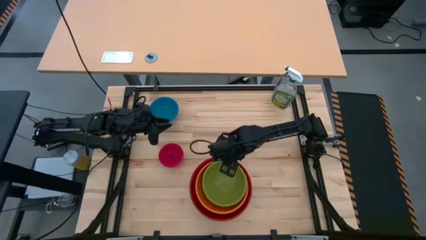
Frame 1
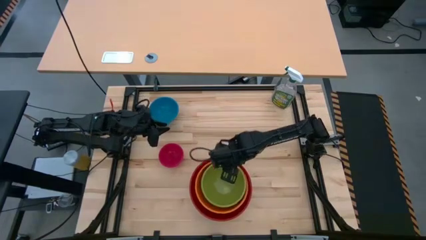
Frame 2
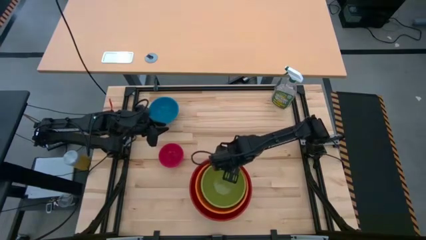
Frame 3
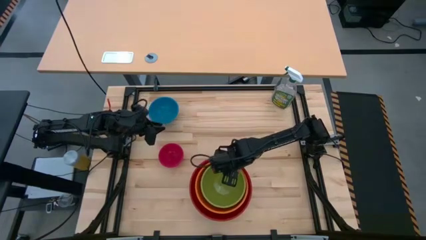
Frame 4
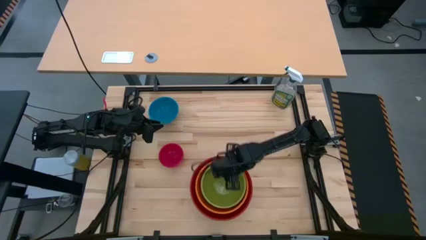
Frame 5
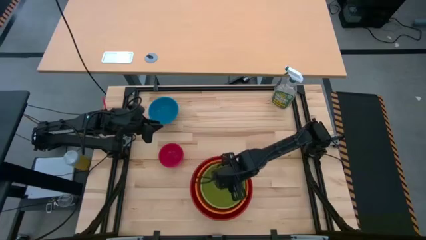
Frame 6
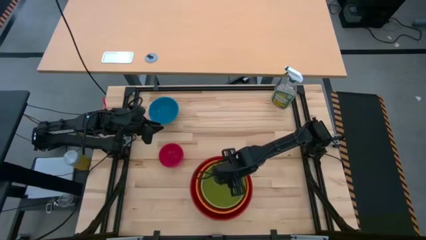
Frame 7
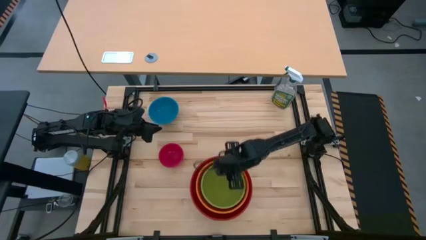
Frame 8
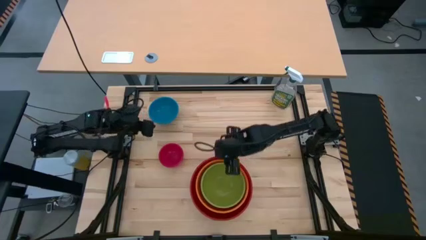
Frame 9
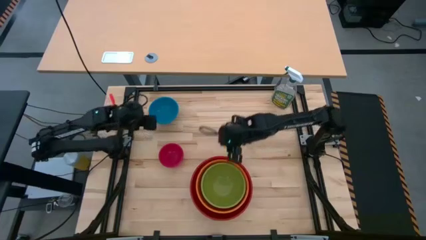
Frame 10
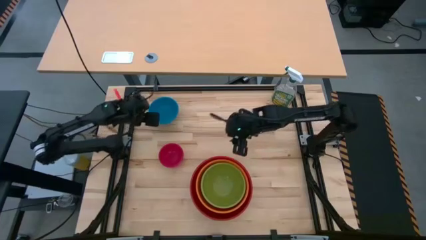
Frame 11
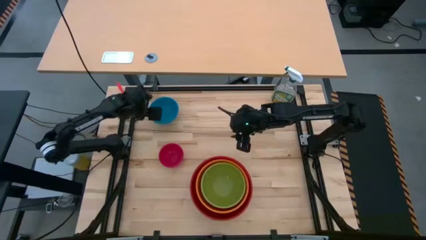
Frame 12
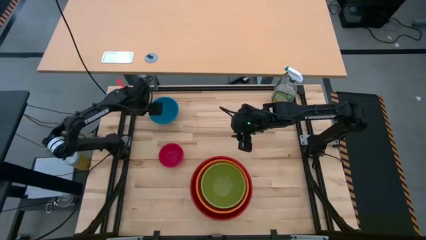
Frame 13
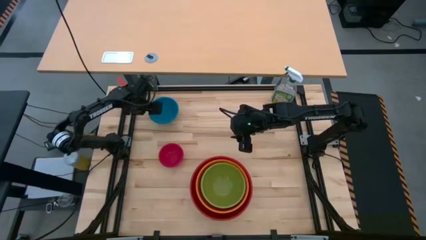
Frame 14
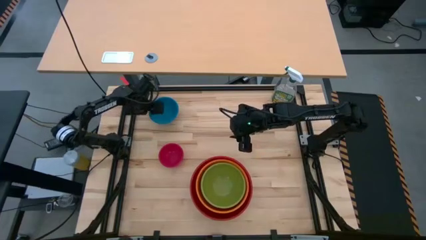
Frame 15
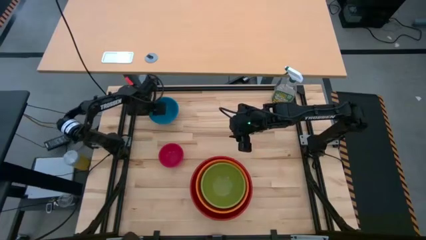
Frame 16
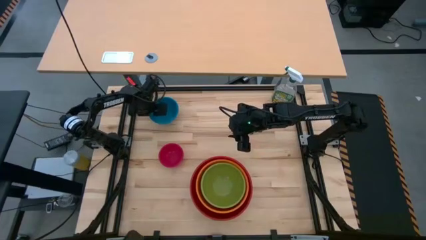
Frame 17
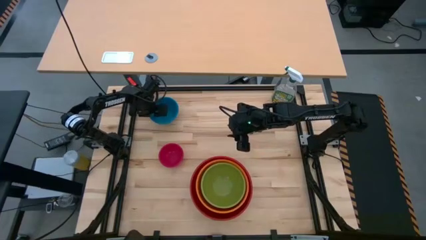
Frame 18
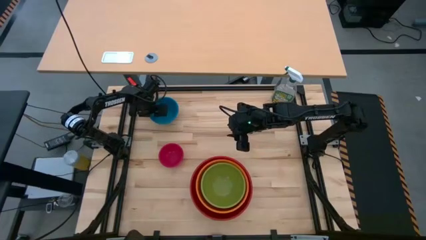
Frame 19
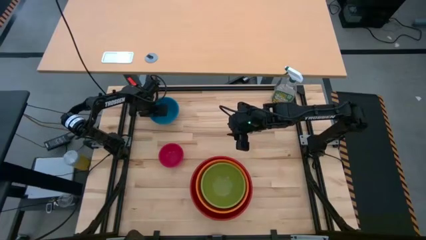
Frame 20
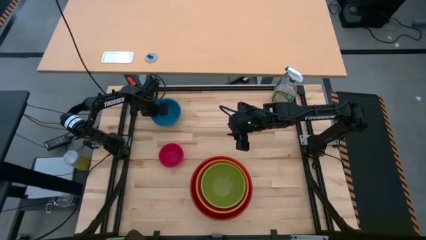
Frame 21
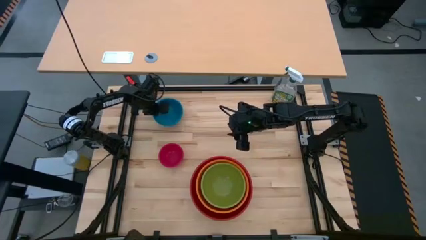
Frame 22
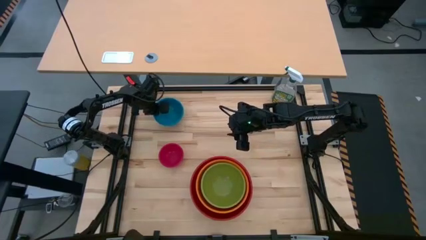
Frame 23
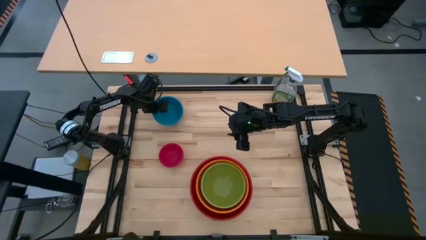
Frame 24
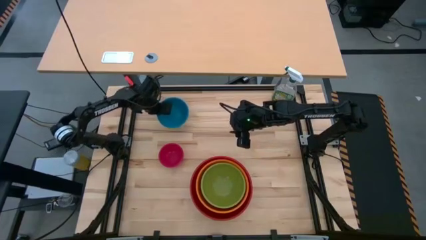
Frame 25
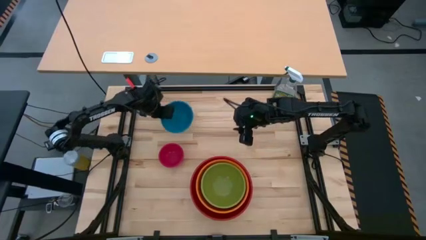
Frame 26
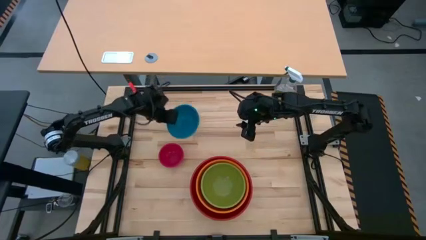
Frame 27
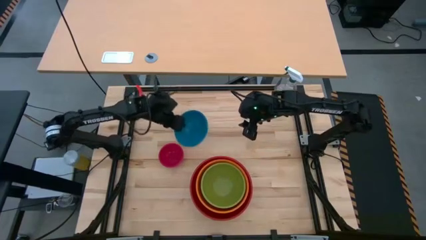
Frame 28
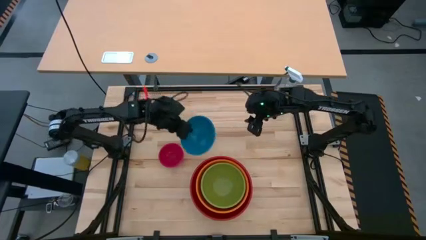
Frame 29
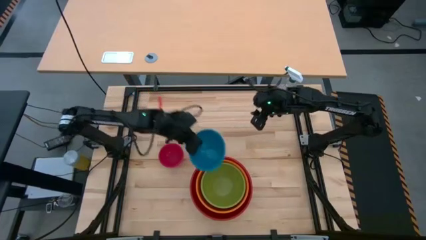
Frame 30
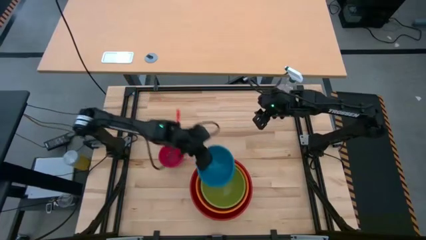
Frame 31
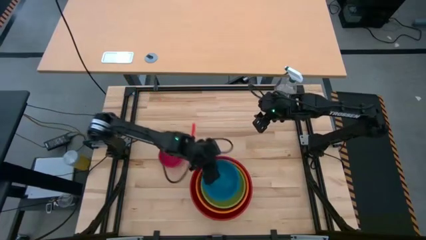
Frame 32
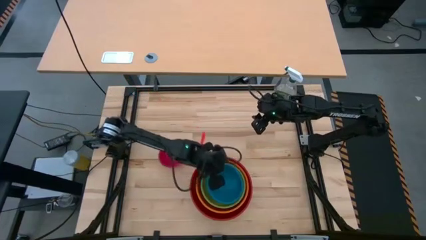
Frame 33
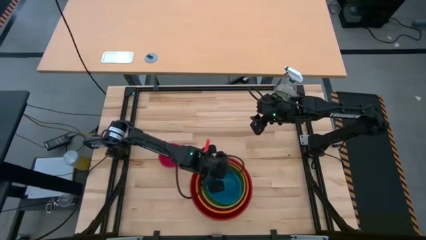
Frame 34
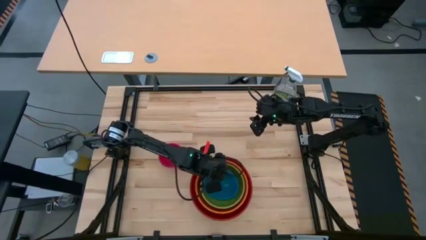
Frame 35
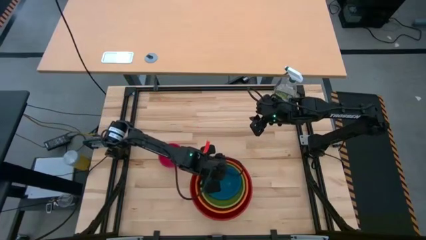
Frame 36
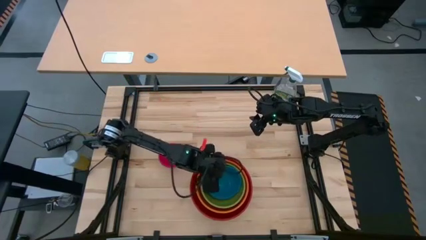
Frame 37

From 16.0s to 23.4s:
Stack the blue bowl on top of the green bowl

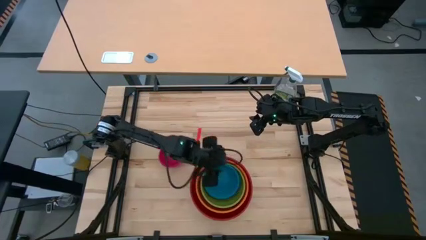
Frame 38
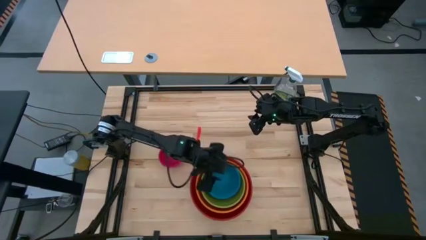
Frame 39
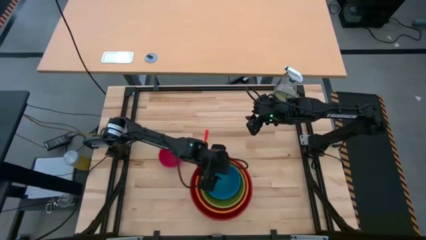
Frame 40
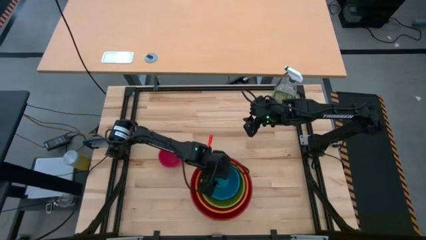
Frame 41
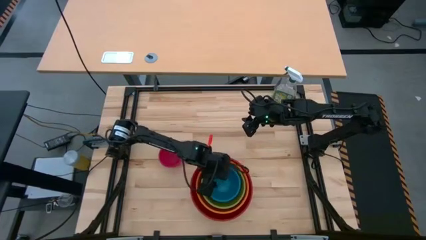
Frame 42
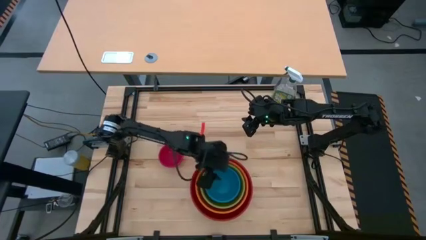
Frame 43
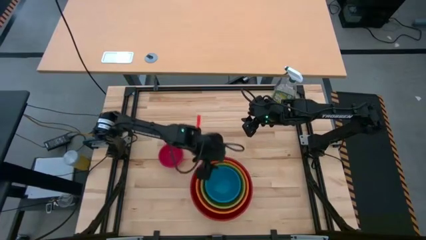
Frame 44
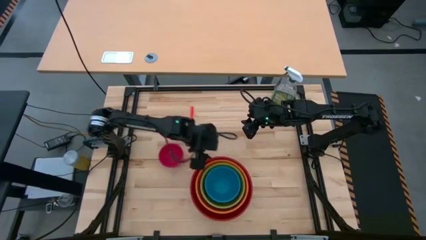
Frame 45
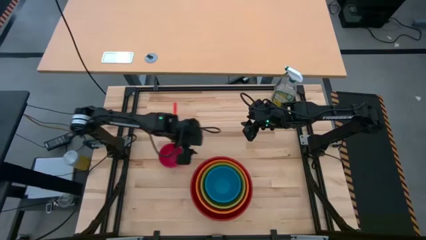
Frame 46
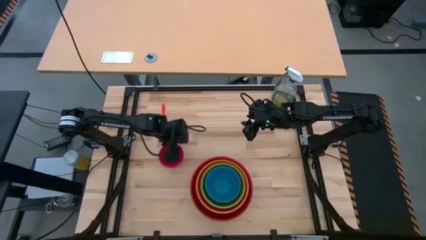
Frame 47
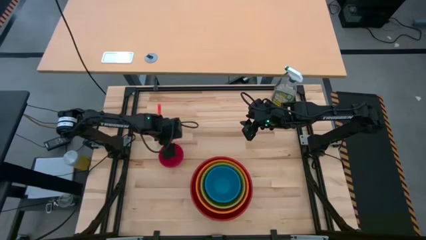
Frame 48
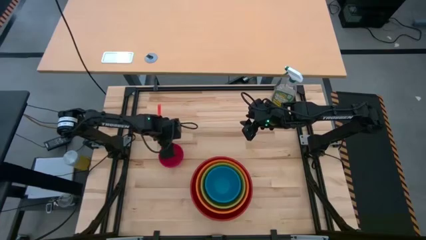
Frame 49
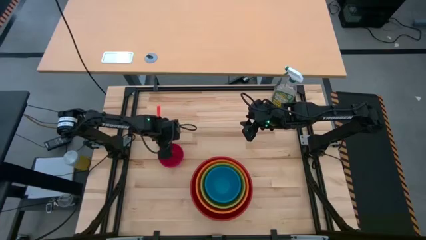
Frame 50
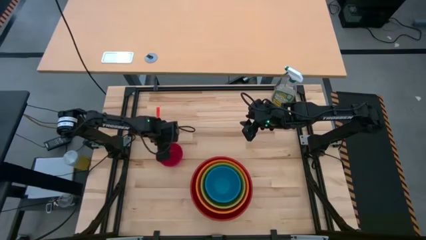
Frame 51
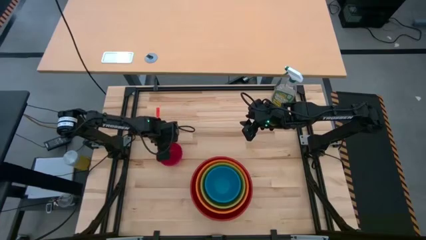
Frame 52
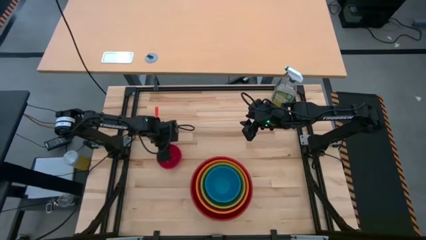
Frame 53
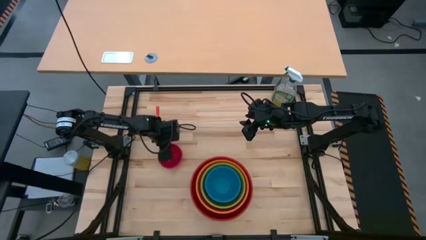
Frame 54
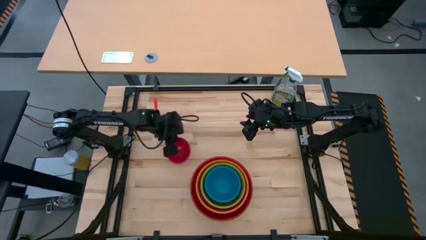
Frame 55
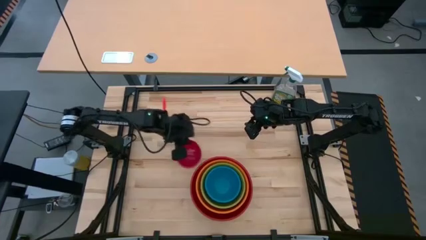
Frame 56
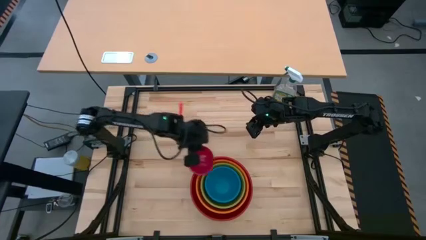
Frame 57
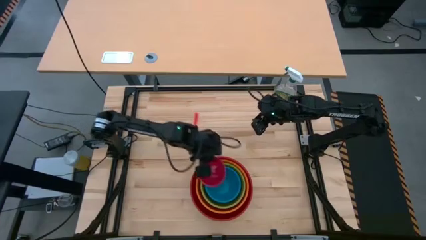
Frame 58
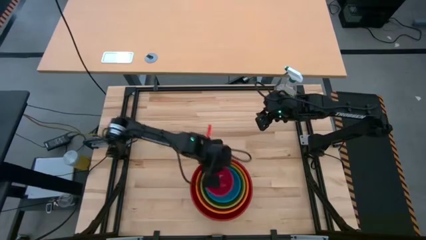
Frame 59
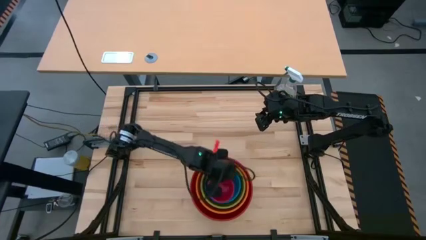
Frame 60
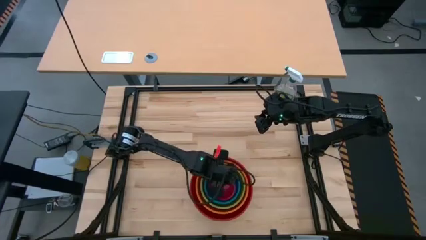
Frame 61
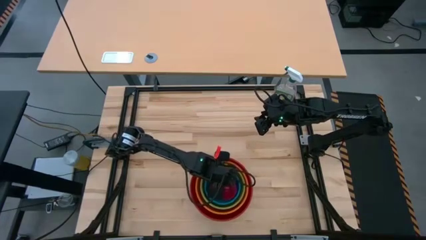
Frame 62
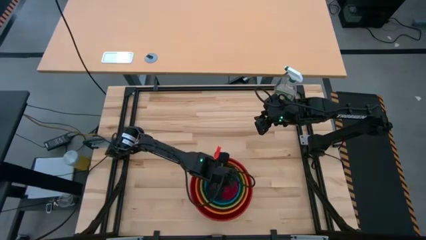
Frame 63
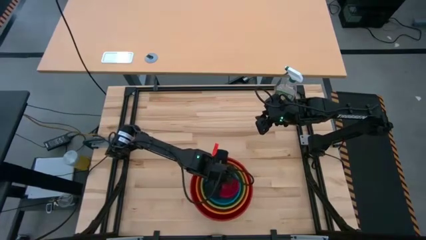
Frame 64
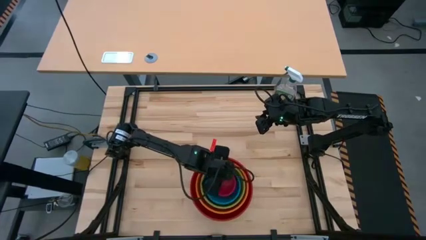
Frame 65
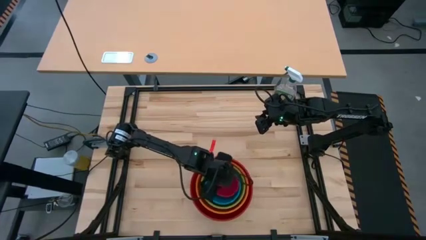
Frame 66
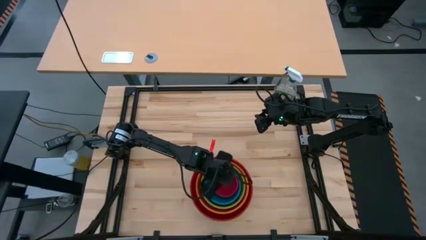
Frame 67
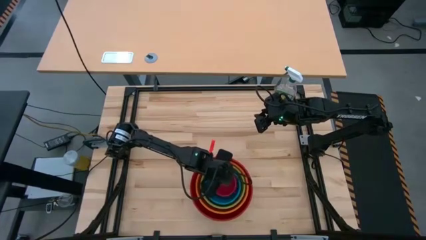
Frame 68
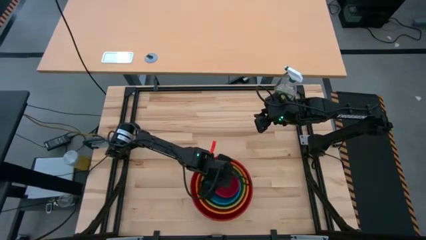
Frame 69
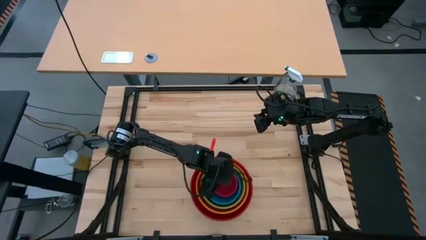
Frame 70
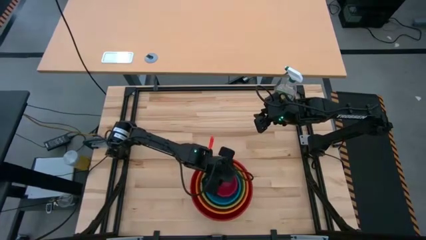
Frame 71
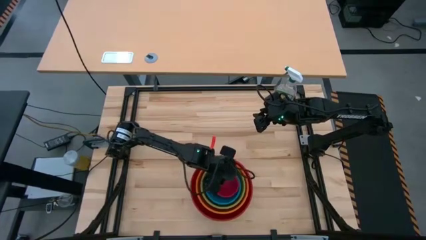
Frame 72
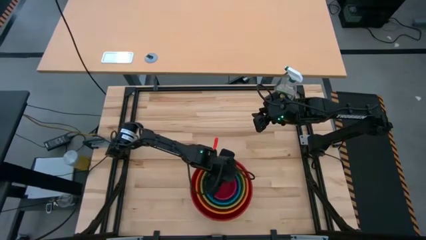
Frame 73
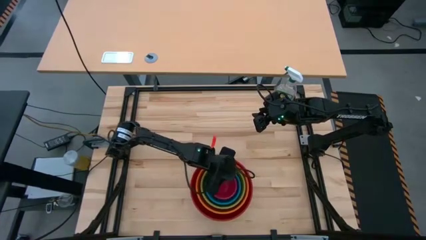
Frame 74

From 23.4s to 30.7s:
Stack the pink bowl on top of the blue bowl
